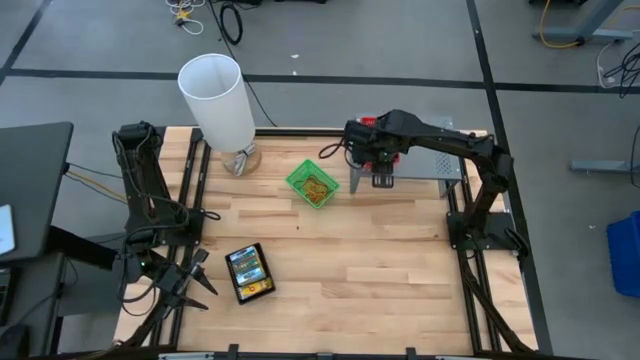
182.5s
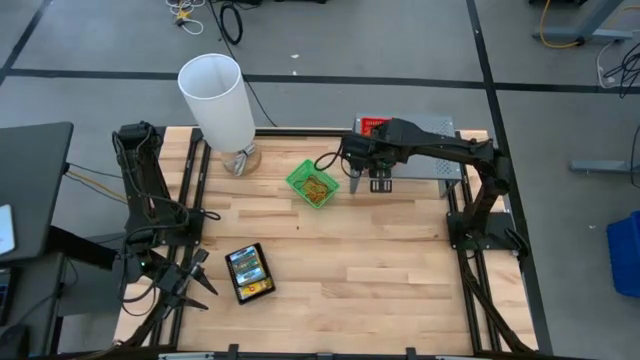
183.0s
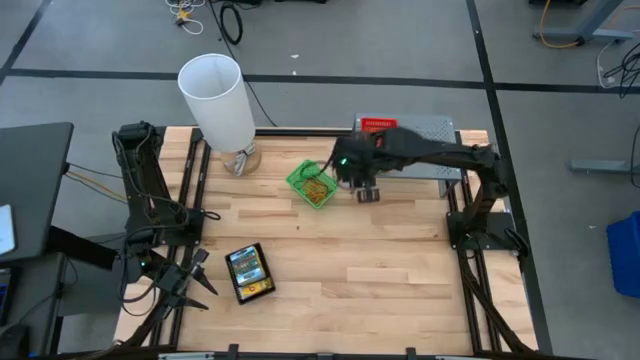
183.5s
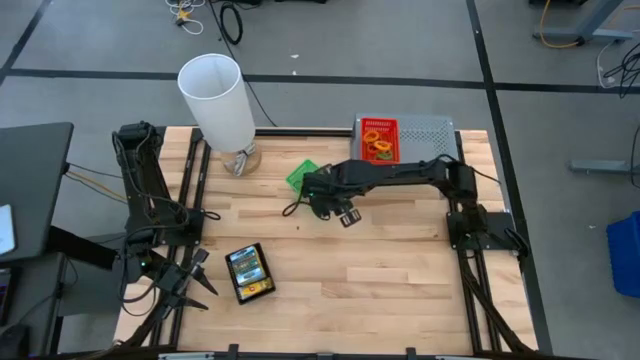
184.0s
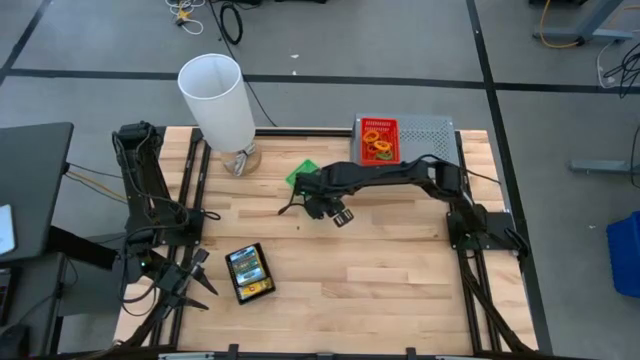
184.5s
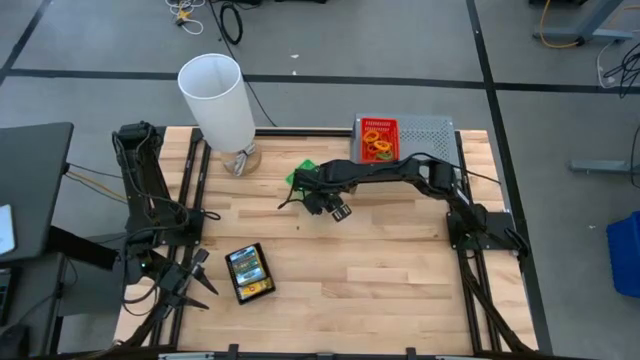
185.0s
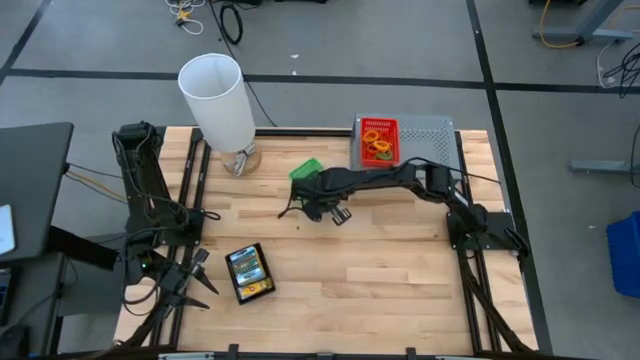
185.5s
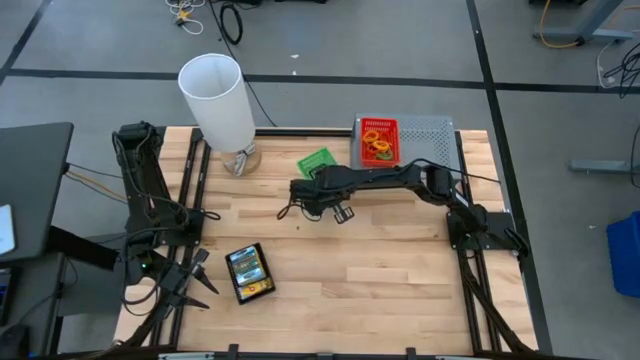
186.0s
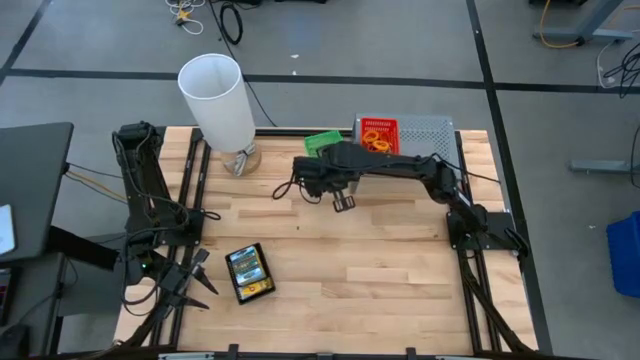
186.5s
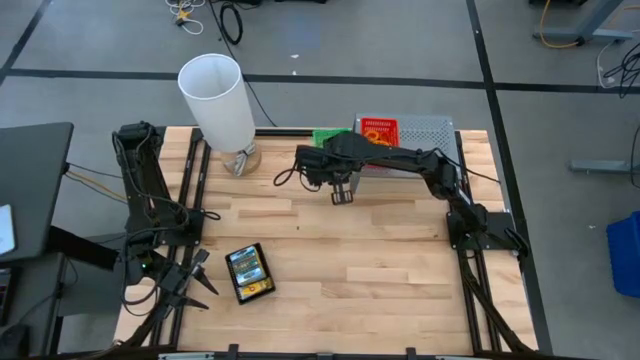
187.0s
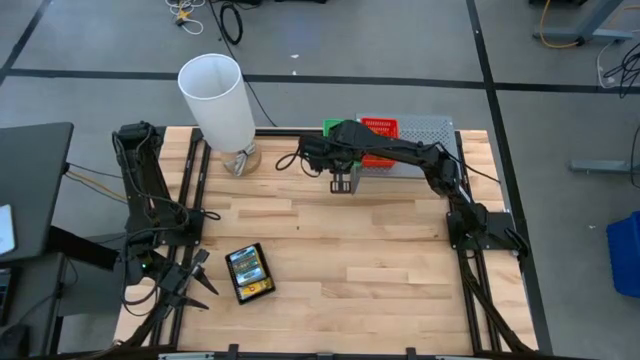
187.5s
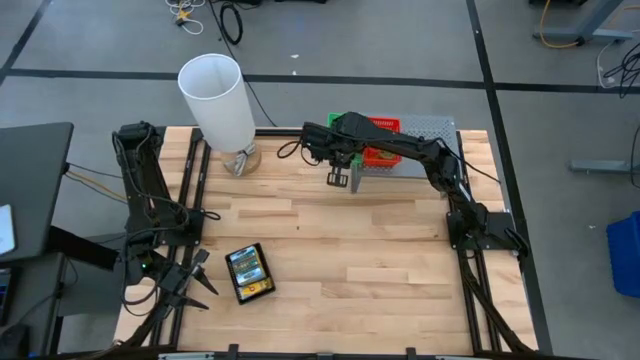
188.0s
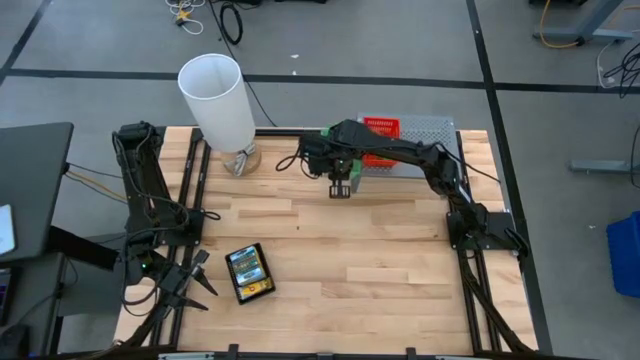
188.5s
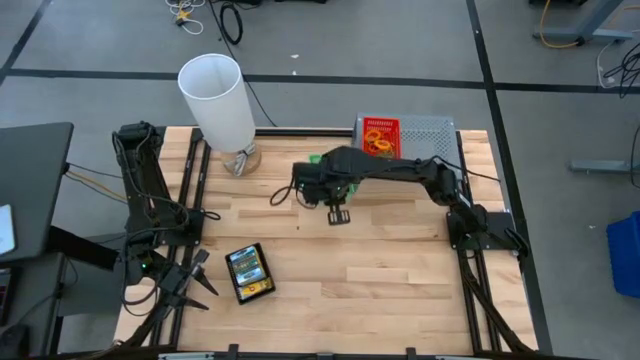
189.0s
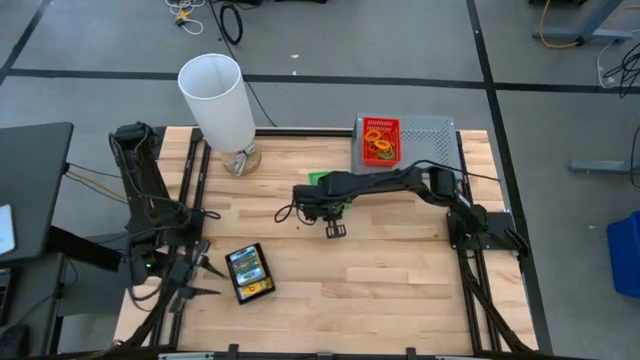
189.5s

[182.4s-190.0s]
Task: Pick & Place Office Desk Supplies
Put the green bin on the shelf

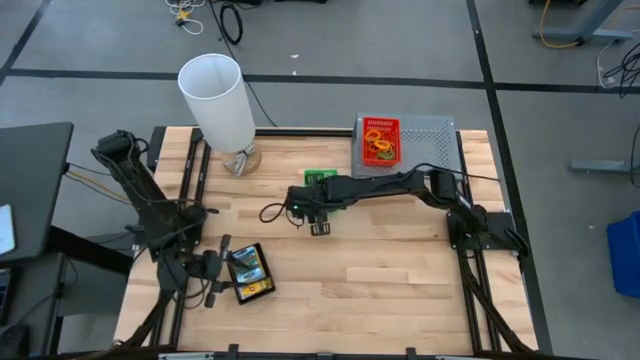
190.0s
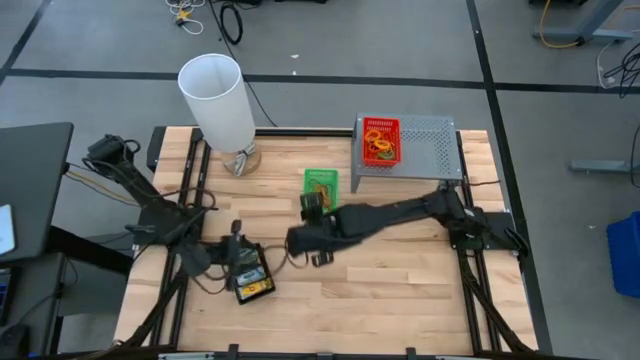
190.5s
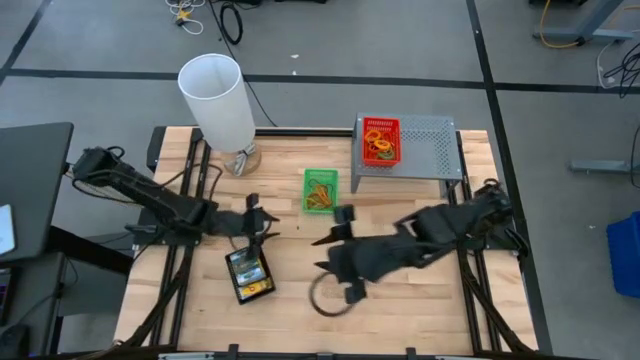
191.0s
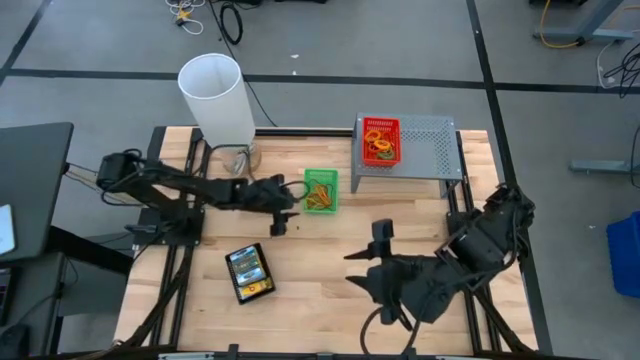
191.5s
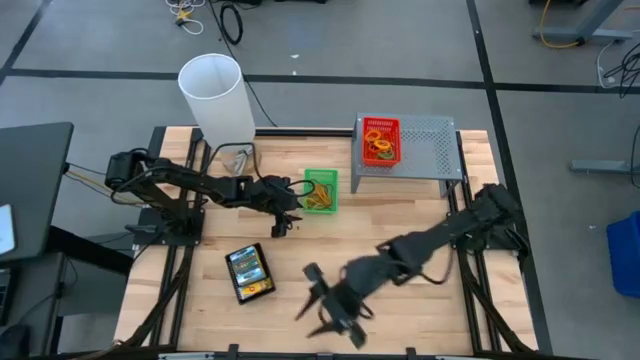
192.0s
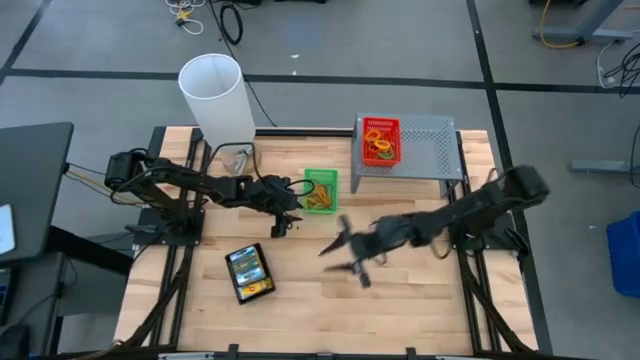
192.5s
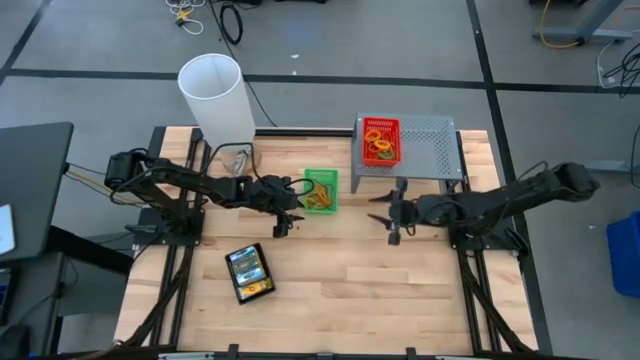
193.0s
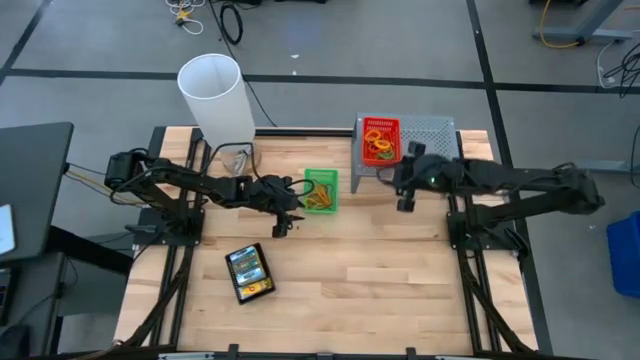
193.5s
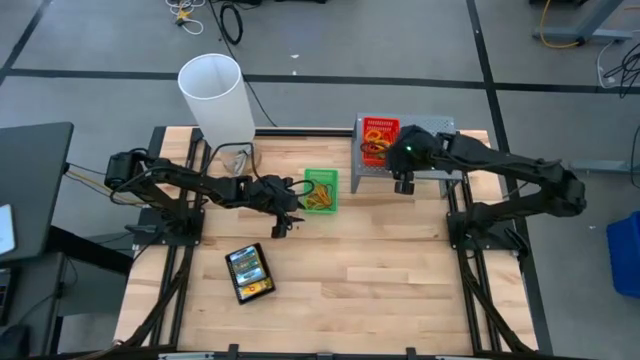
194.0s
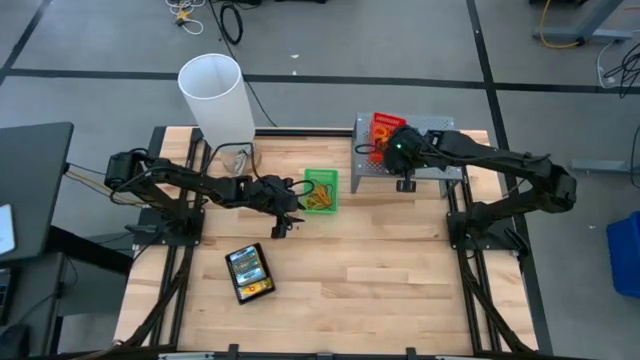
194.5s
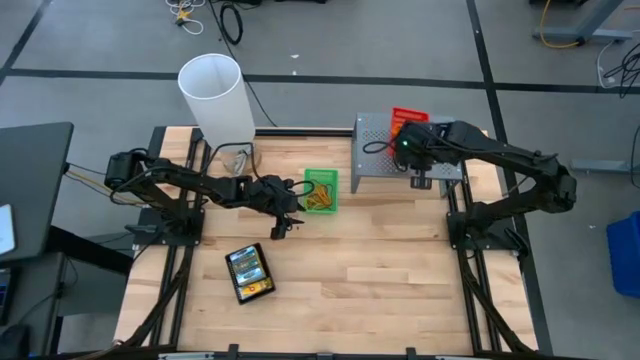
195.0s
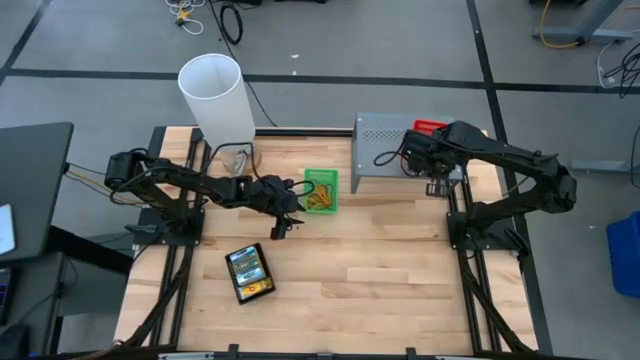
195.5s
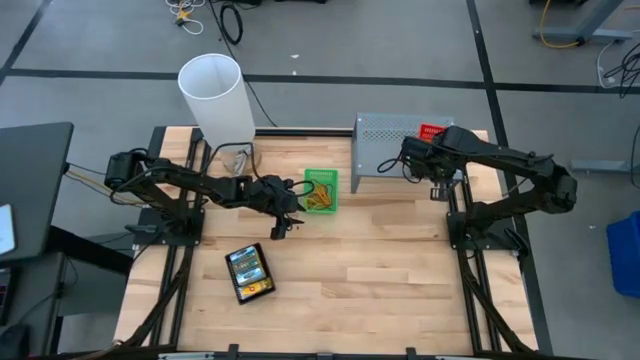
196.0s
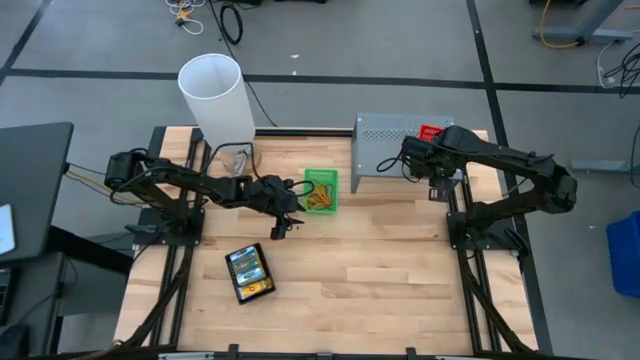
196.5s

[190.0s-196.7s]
Move the red bin to the right side of the shelf

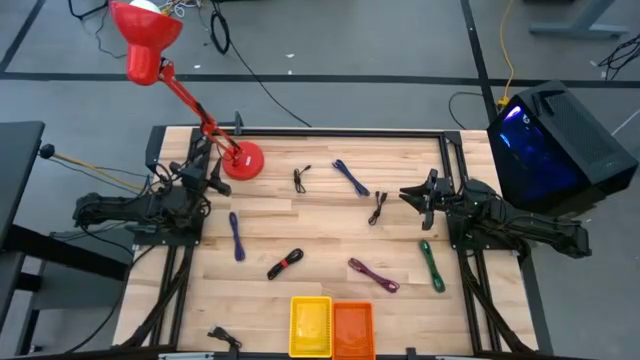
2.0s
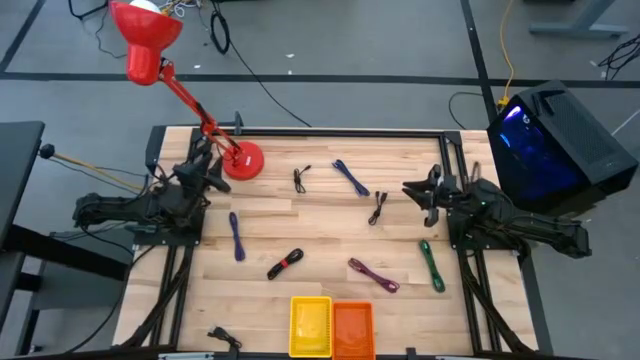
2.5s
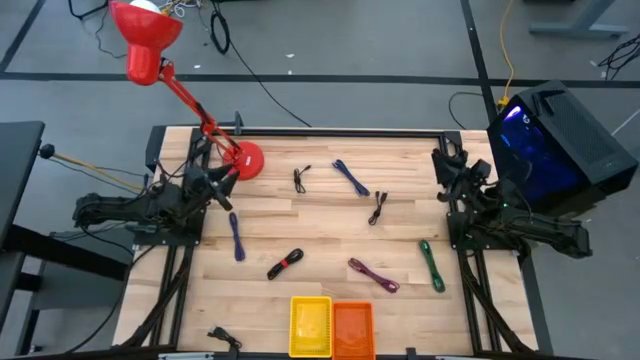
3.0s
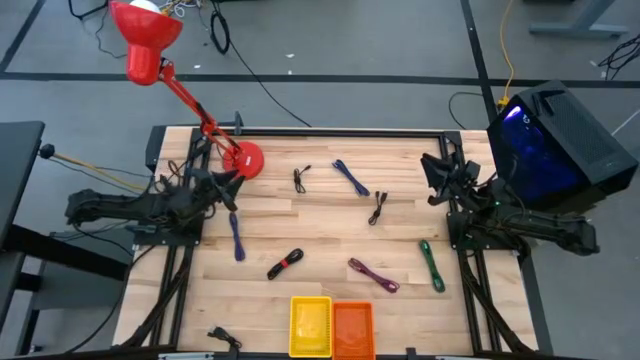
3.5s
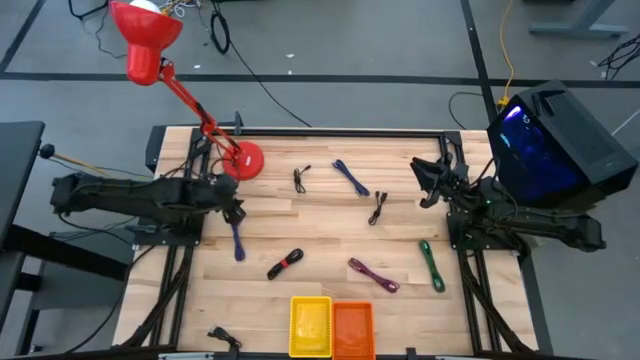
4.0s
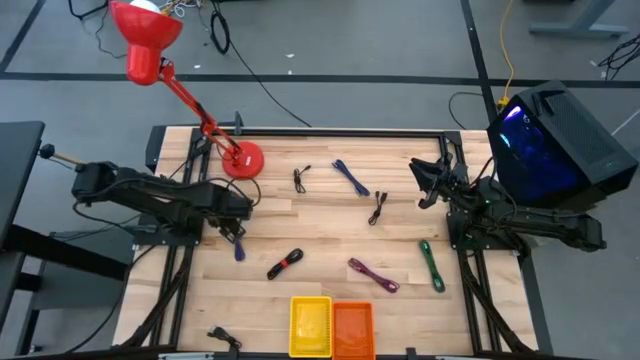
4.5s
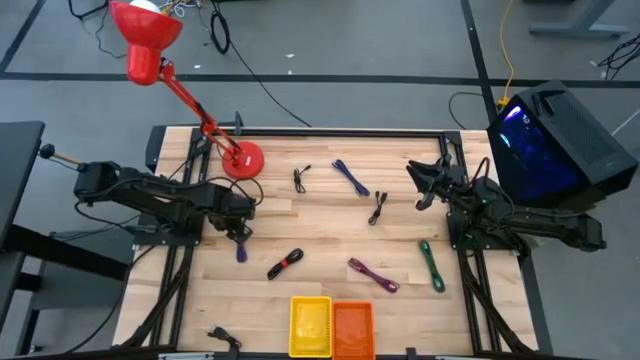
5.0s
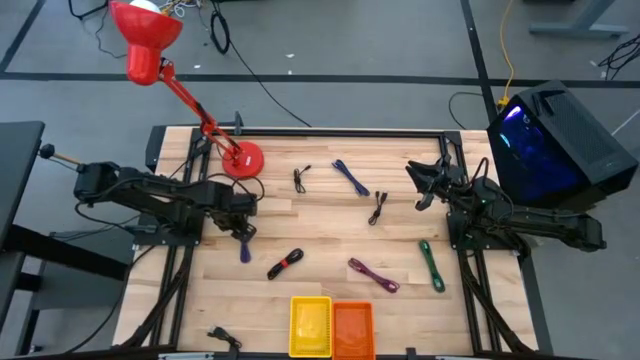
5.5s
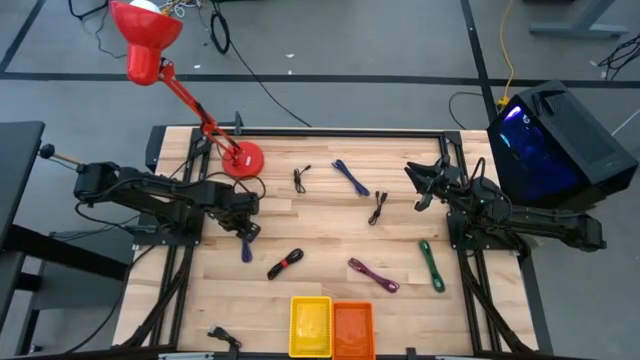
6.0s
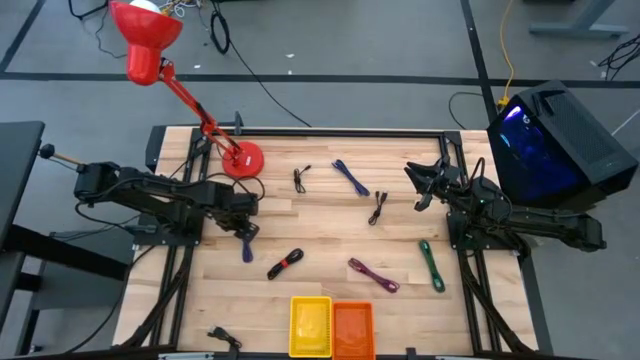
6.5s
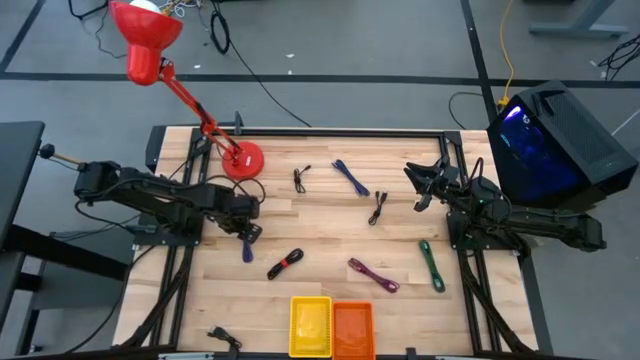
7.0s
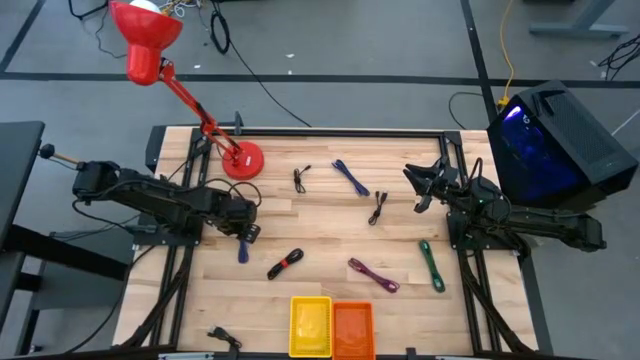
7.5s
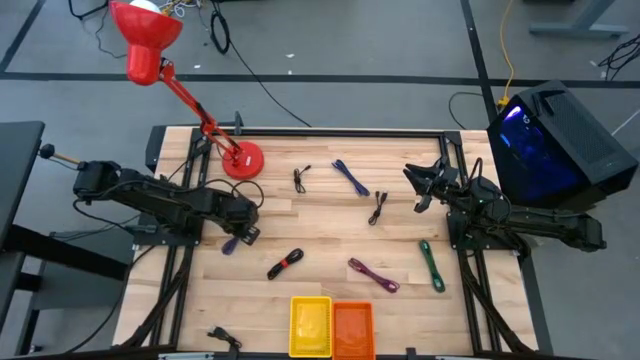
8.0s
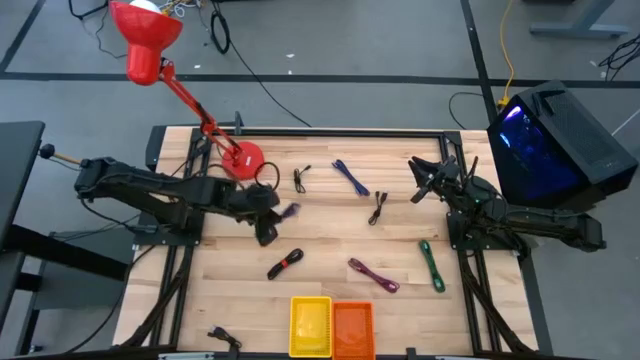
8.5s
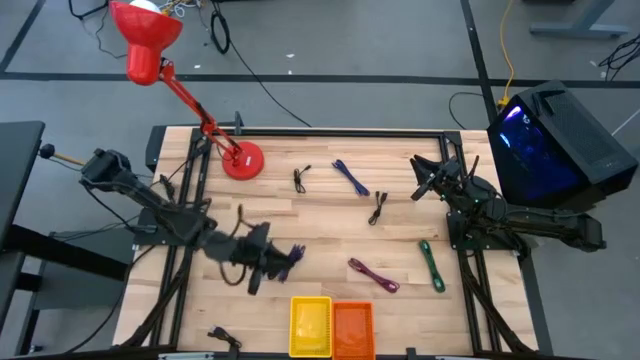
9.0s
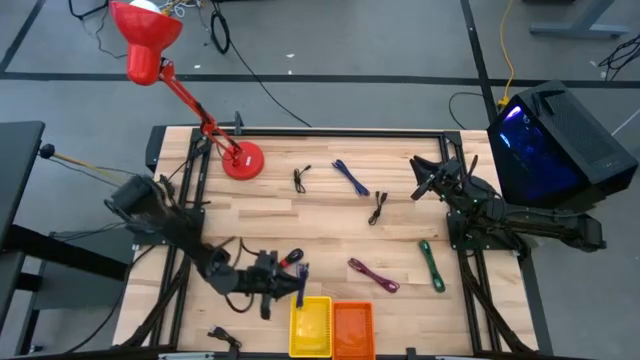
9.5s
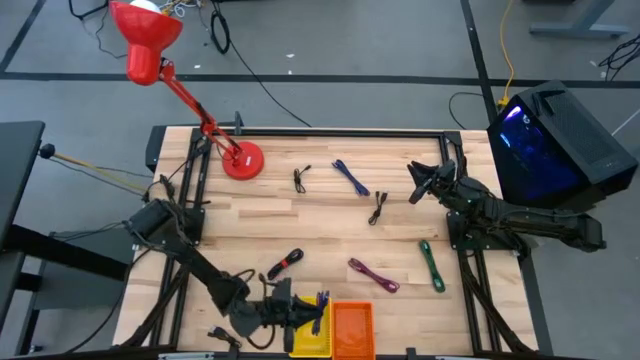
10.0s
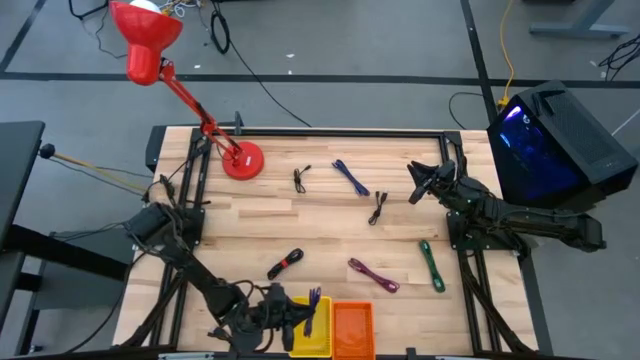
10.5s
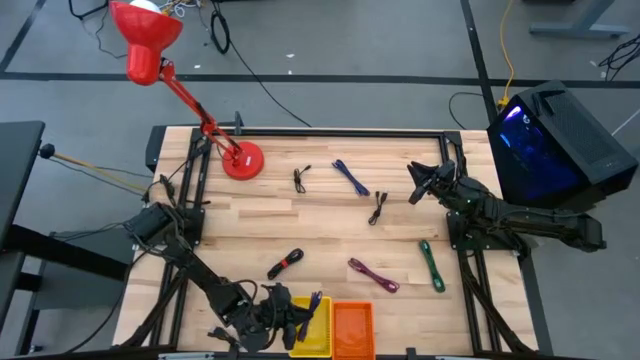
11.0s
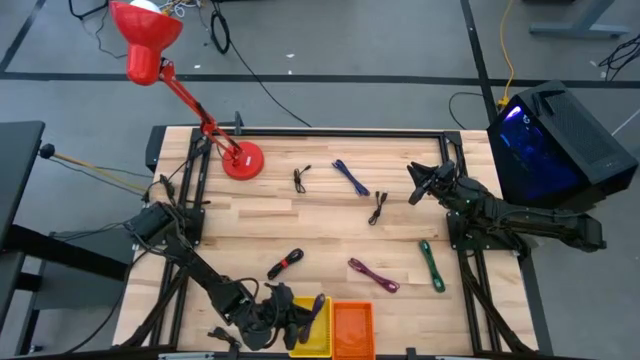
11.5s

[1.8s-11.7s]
Task: Pick & Place USB Port
Put the bottom blue charger cable into the yellow bin
